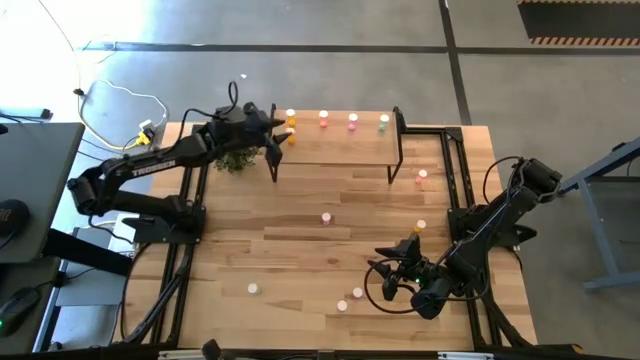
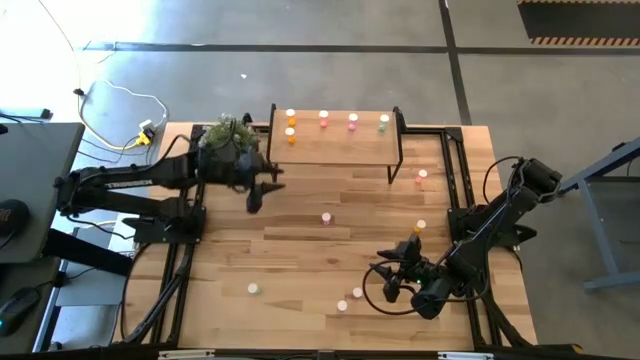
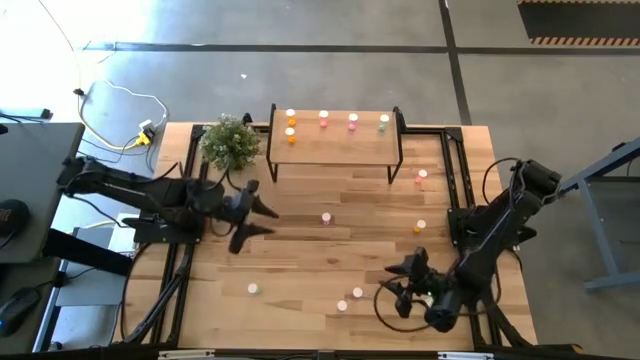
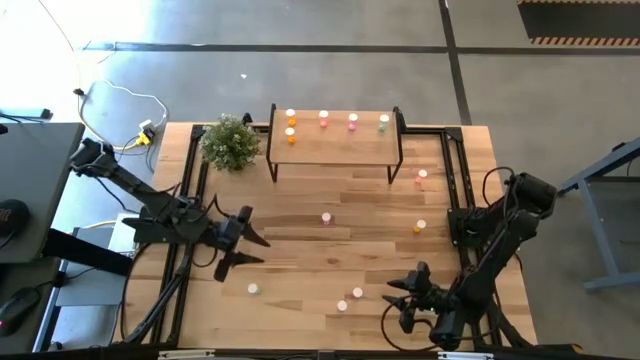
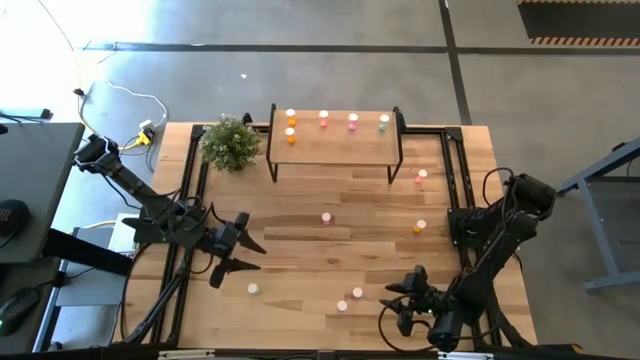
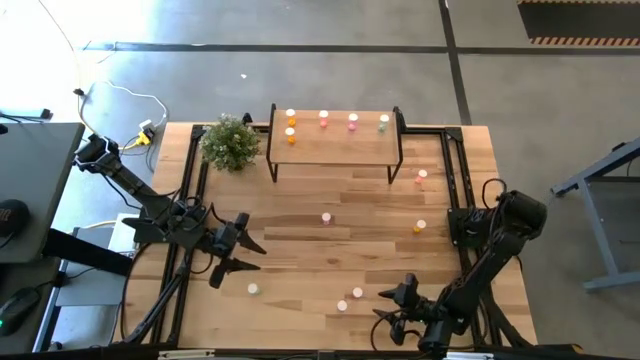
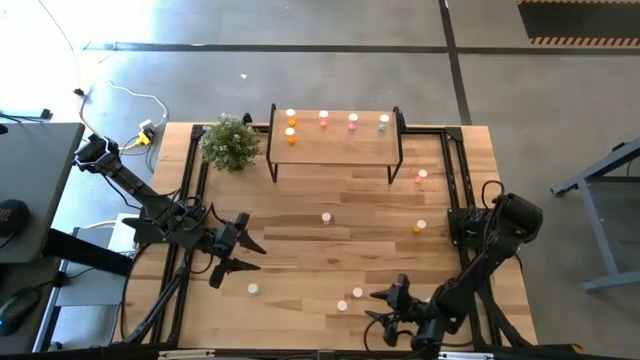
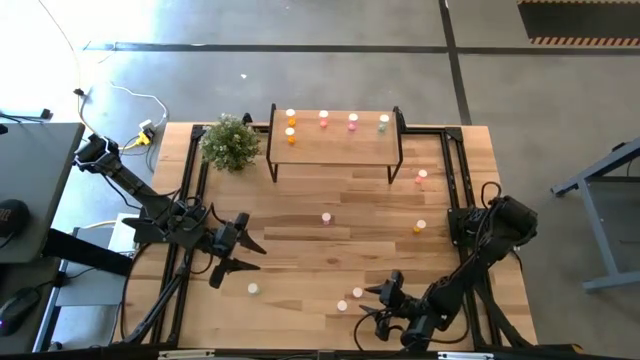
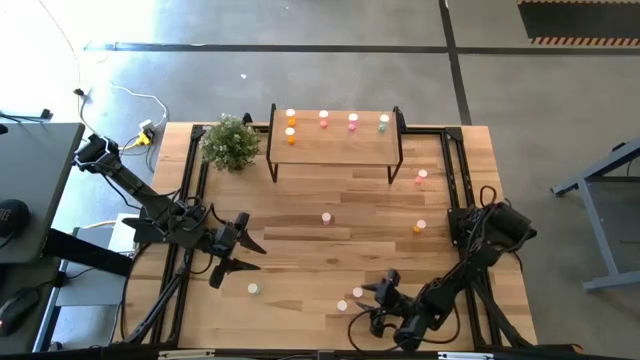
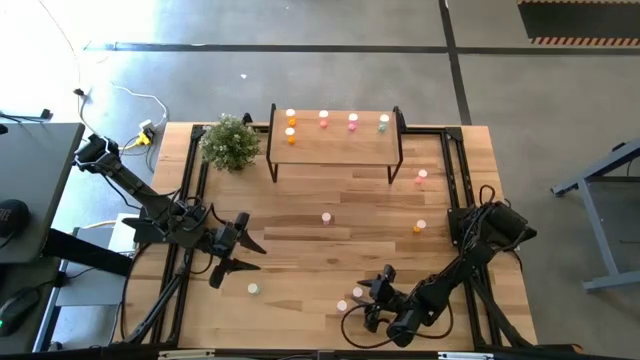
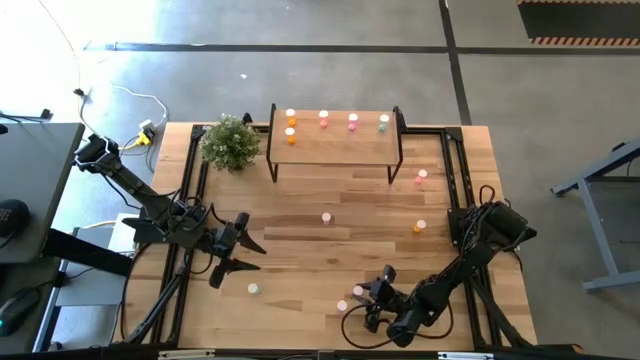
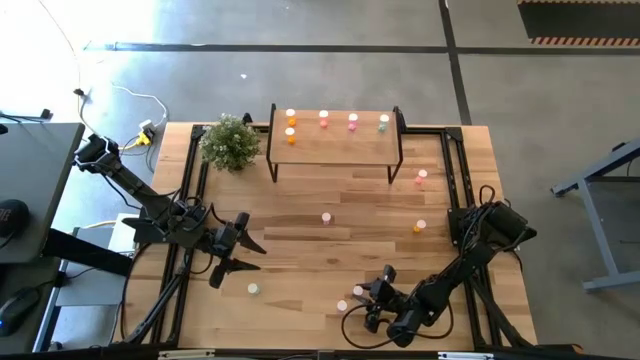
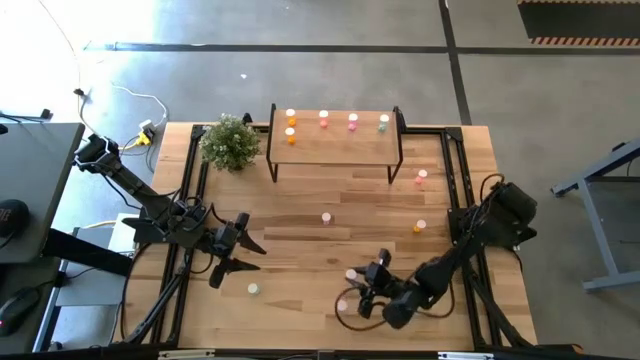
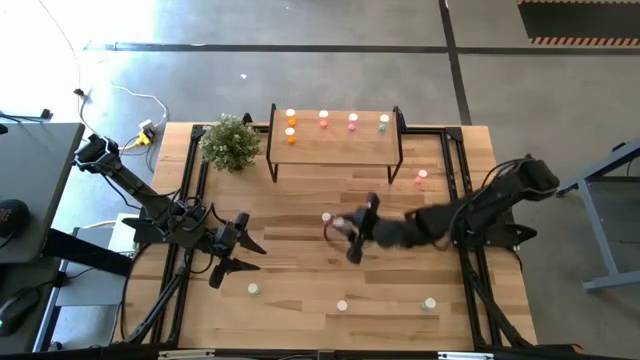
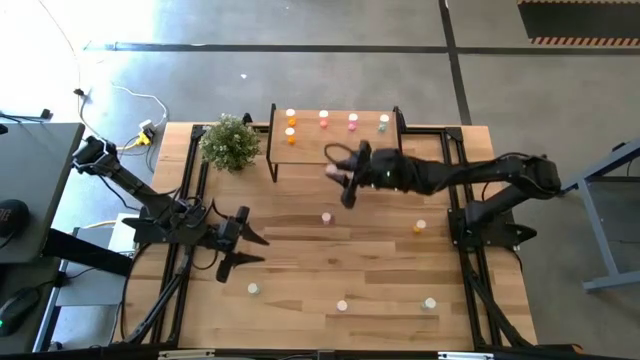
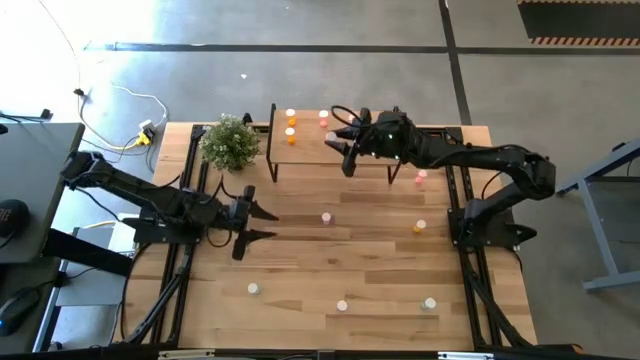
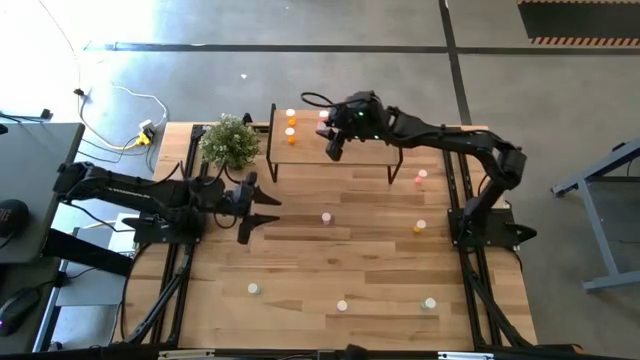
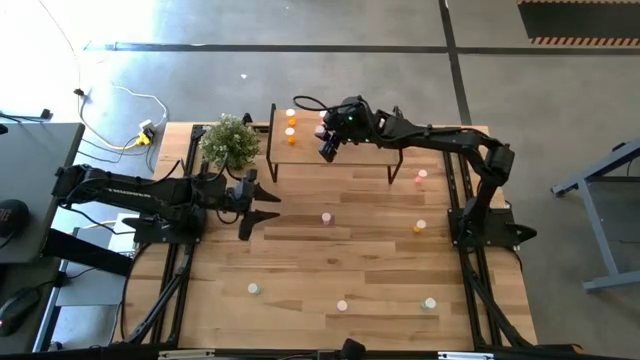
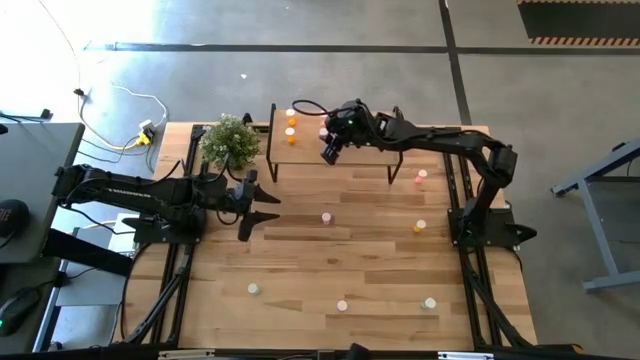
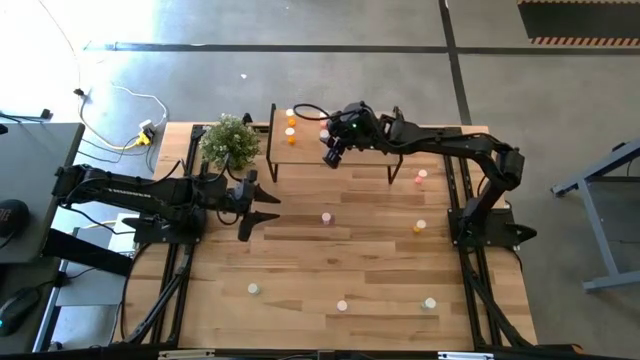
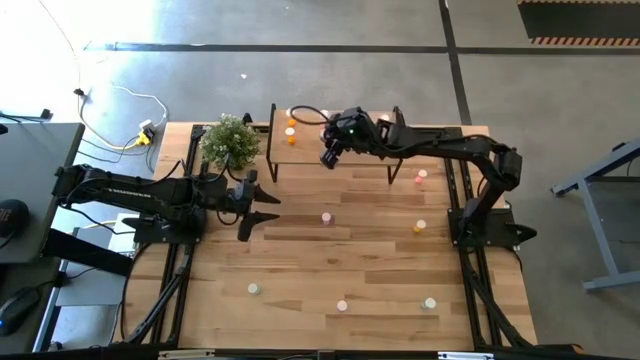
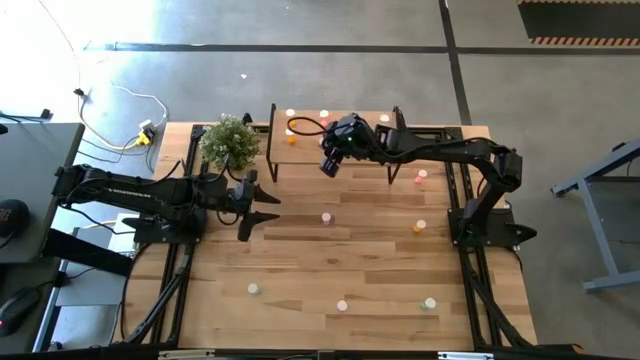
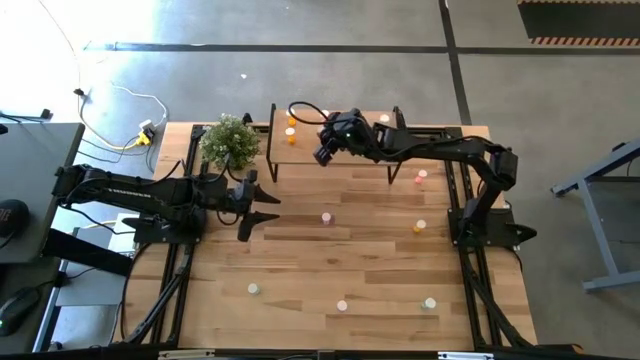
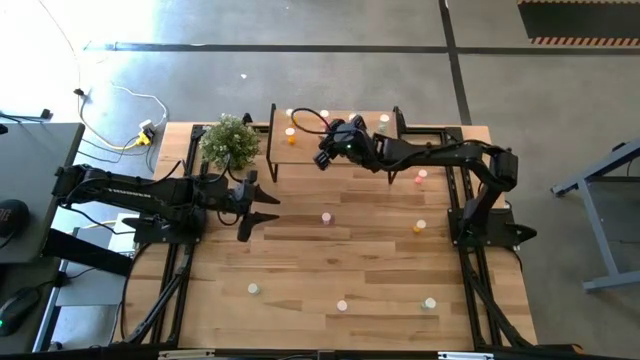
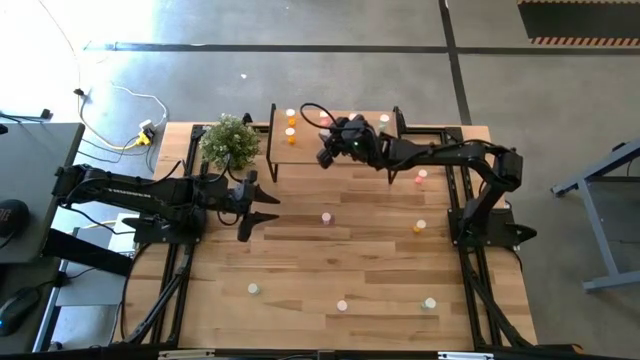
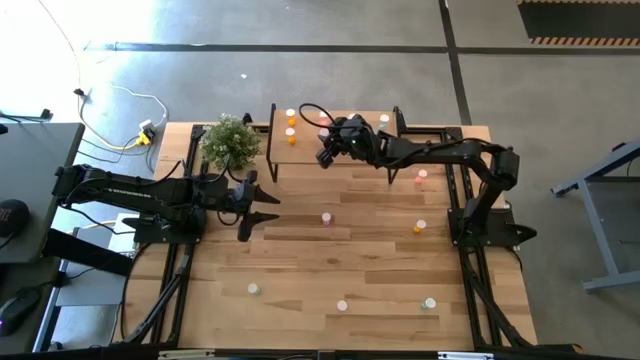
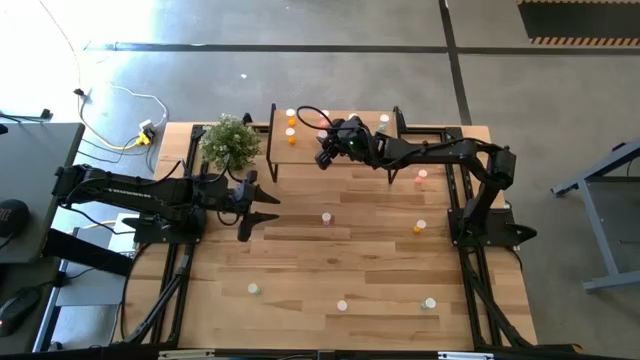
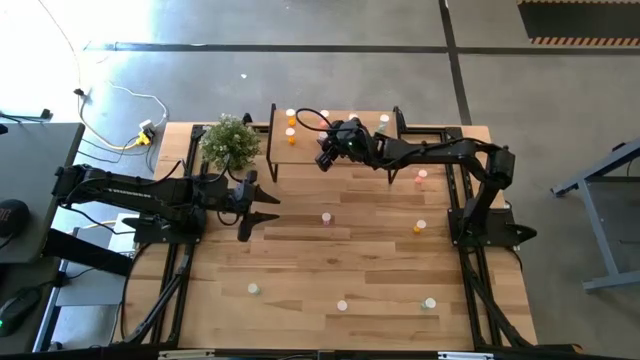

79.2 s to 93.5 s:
Task: Pick and place medicine bottles onto shelf by color
Put the bottom pink pill bottle aligned with the other pink pill bottle on the shelf

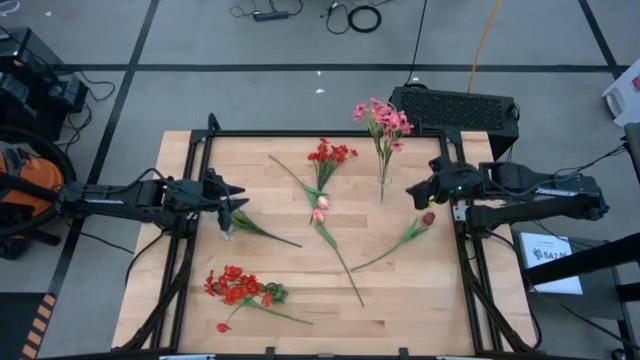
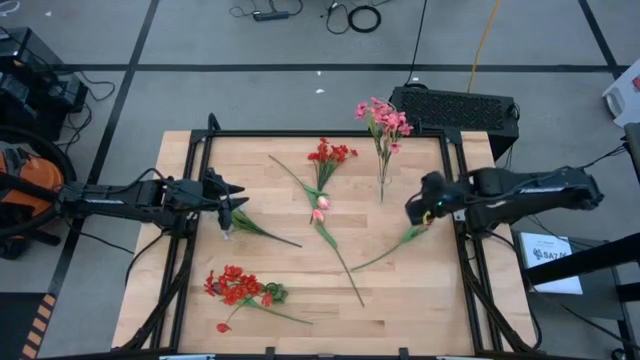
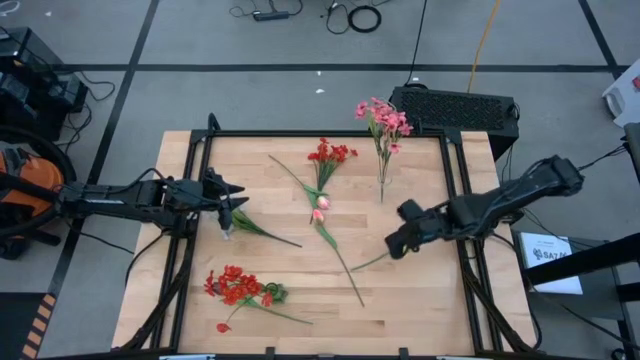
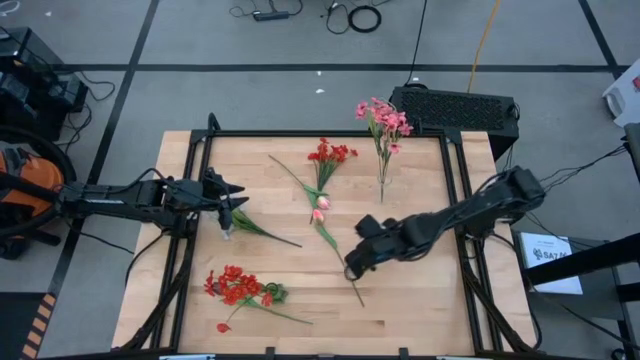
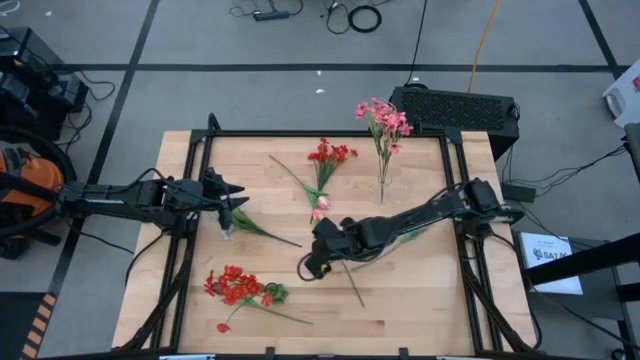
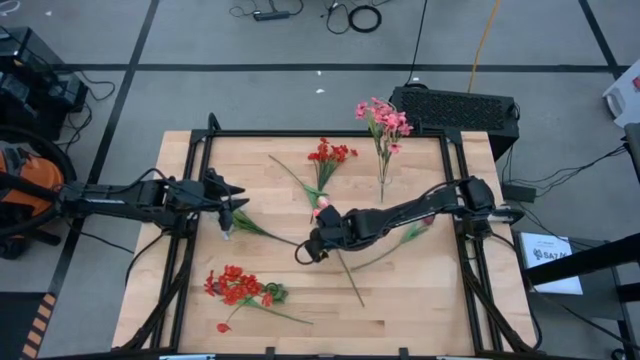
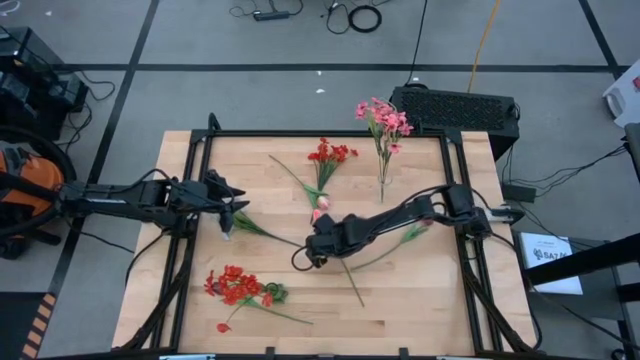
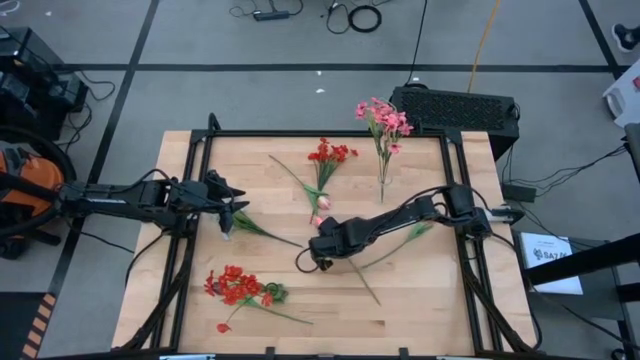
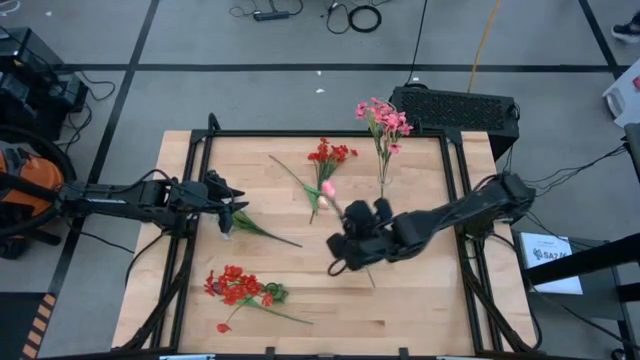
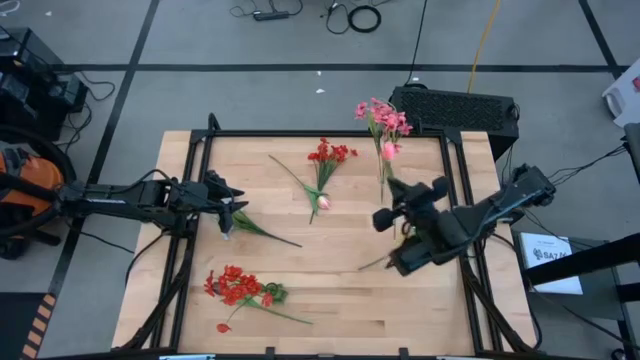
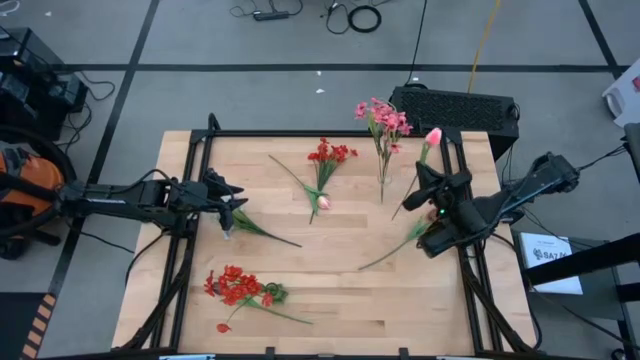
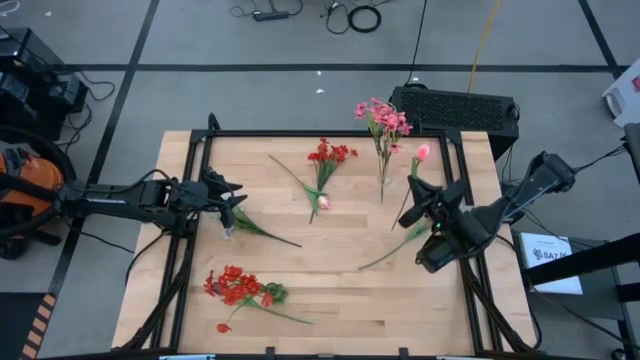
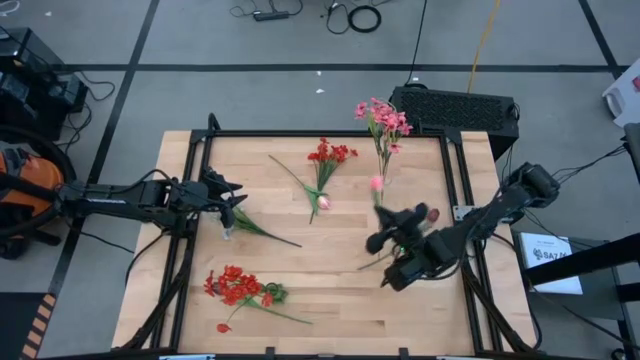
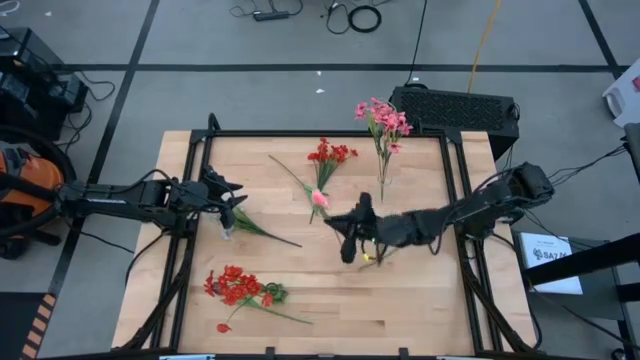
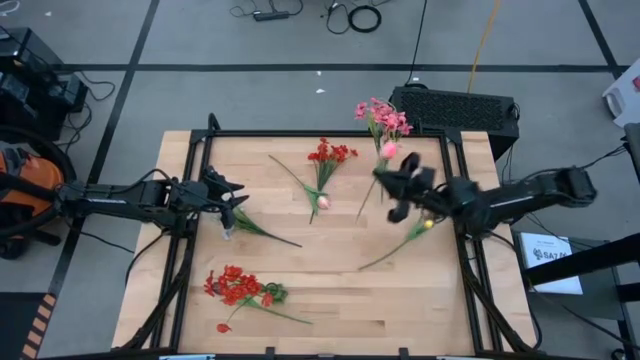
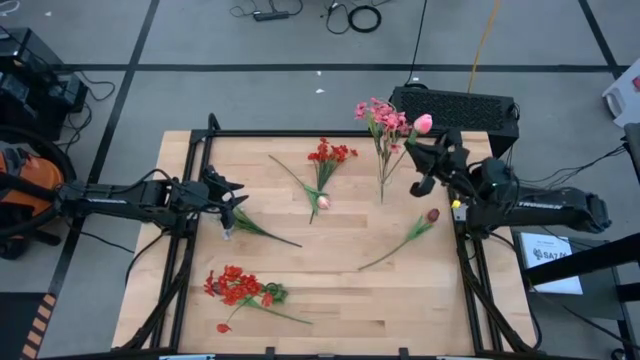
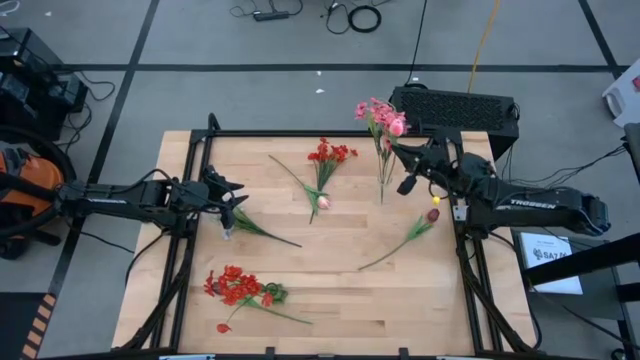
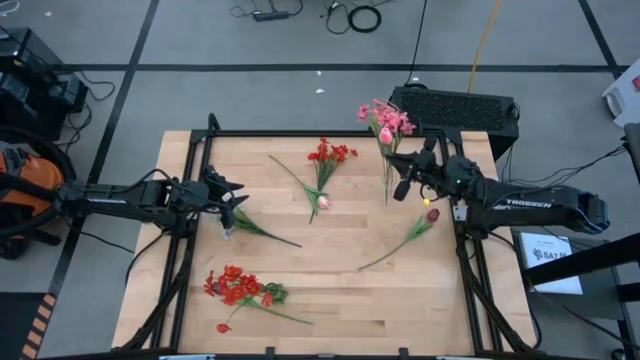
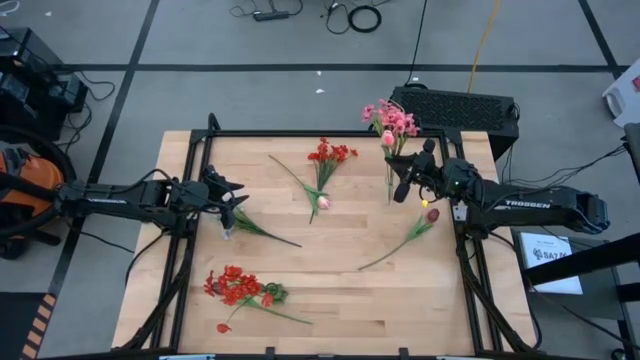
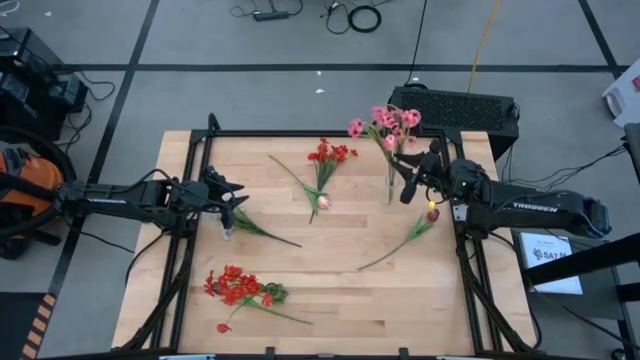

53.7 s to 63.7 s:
Task: Sort flowers into vase by color
Put the bottom pink flower into the transparent vase
